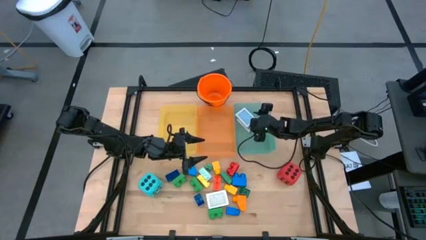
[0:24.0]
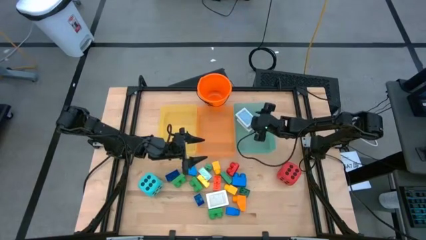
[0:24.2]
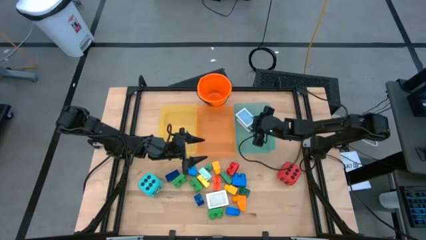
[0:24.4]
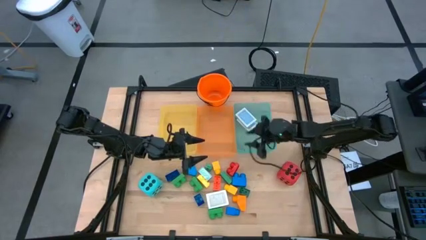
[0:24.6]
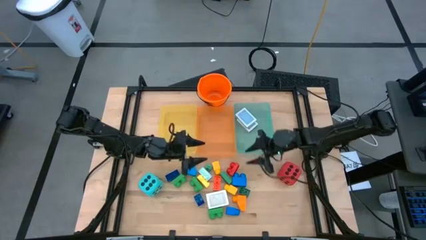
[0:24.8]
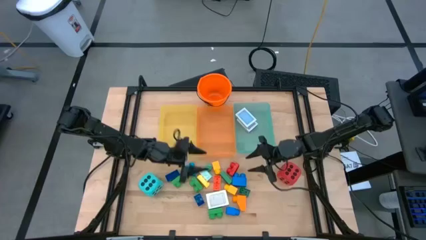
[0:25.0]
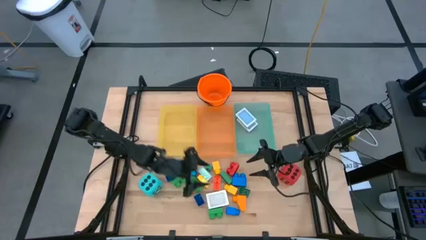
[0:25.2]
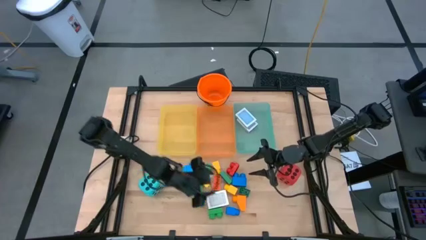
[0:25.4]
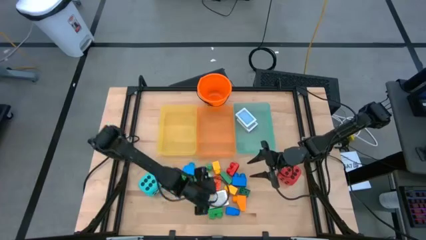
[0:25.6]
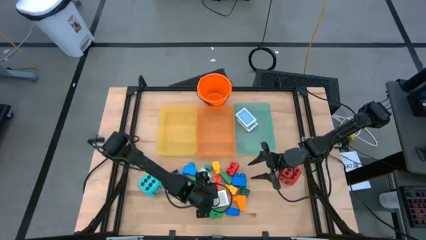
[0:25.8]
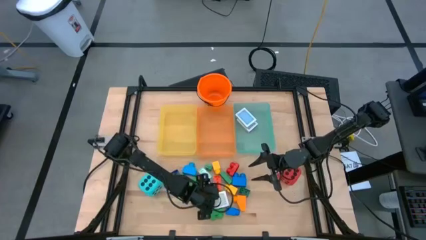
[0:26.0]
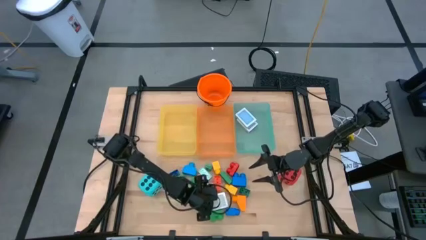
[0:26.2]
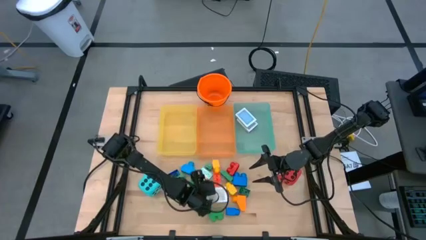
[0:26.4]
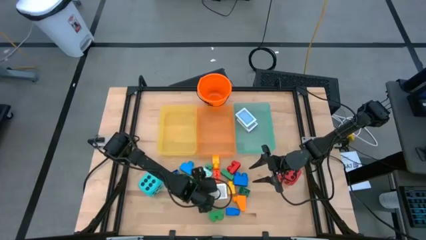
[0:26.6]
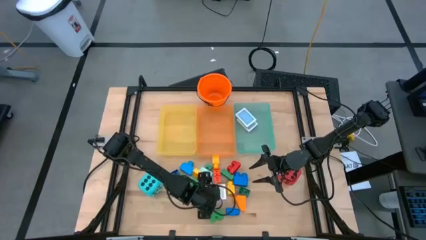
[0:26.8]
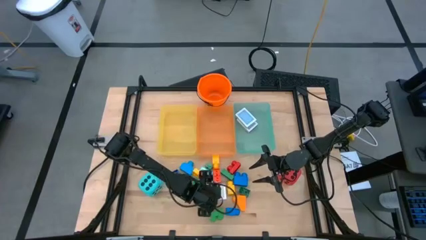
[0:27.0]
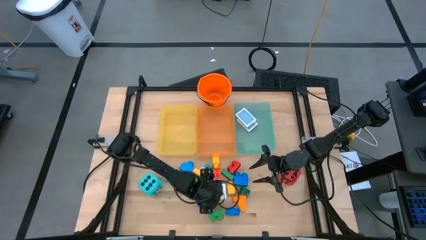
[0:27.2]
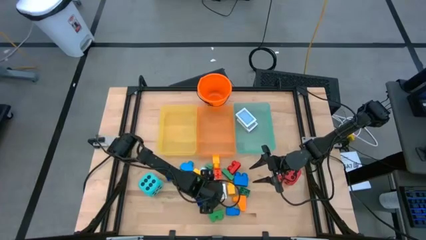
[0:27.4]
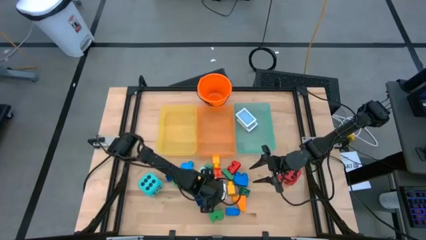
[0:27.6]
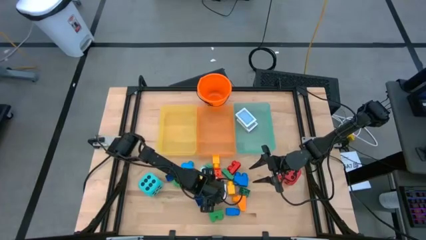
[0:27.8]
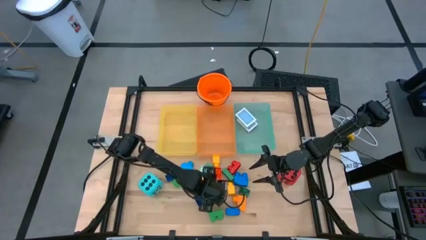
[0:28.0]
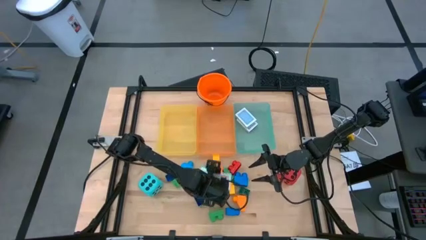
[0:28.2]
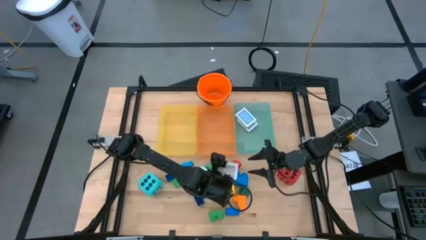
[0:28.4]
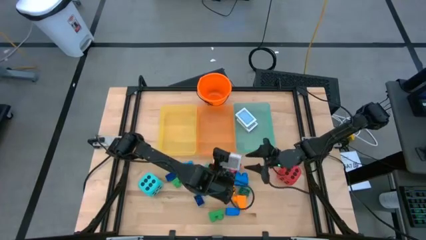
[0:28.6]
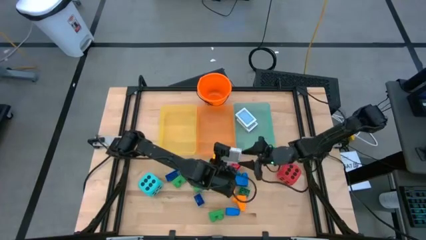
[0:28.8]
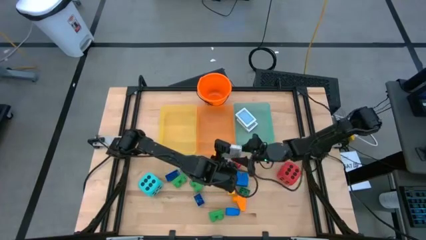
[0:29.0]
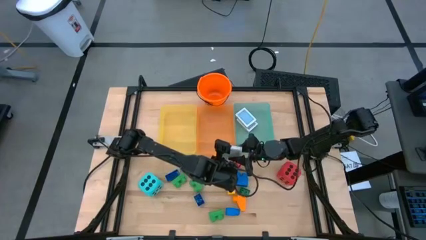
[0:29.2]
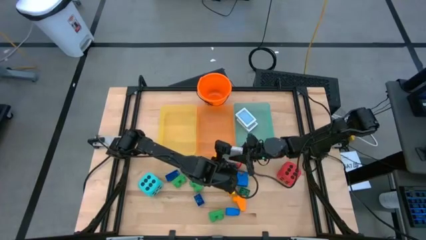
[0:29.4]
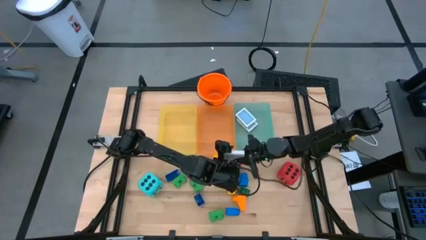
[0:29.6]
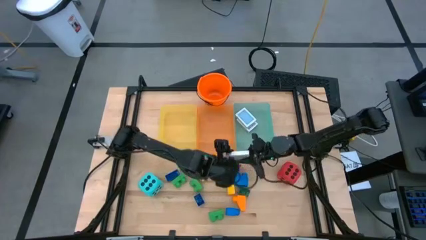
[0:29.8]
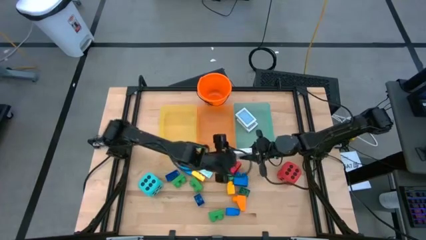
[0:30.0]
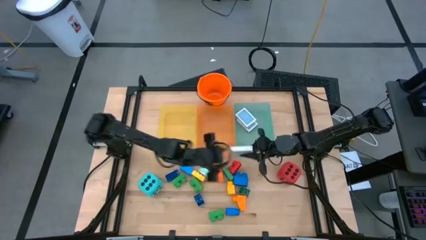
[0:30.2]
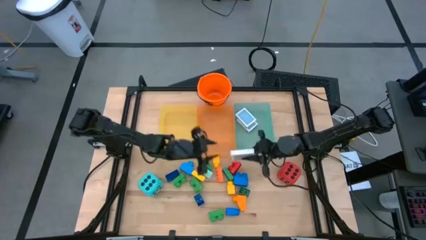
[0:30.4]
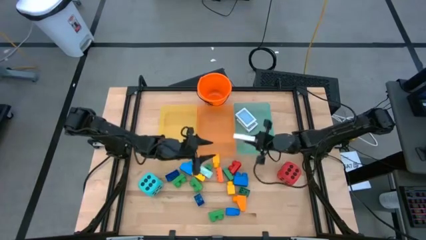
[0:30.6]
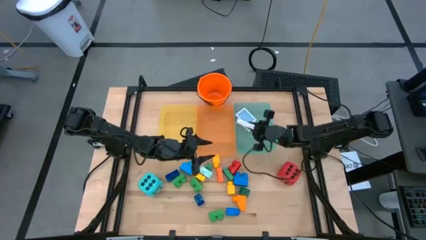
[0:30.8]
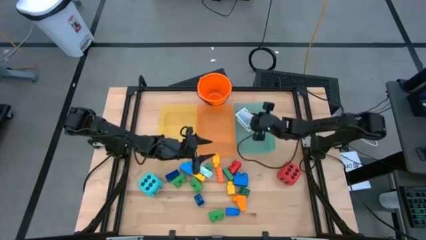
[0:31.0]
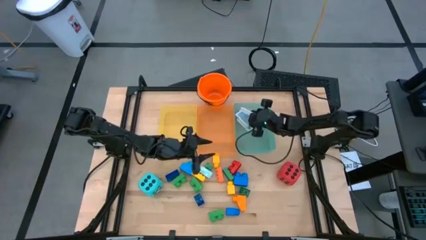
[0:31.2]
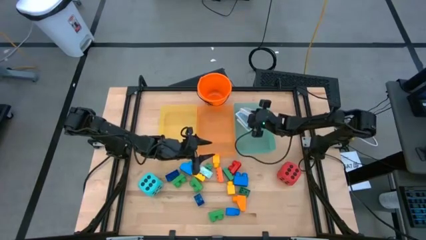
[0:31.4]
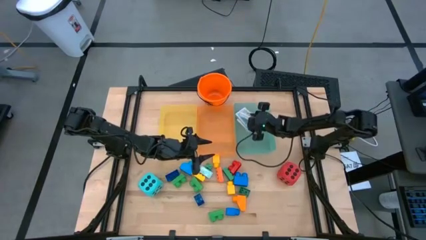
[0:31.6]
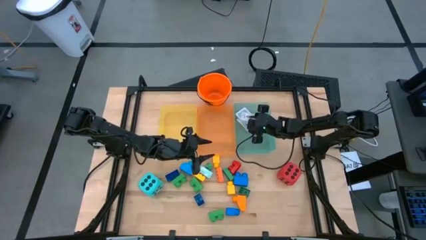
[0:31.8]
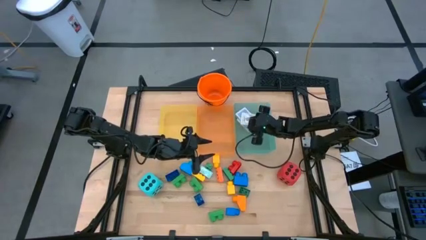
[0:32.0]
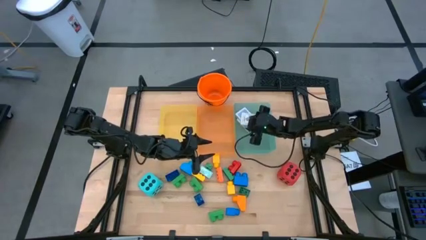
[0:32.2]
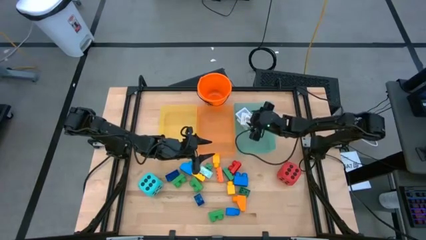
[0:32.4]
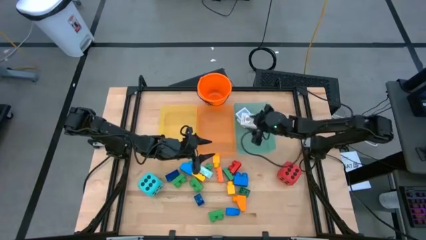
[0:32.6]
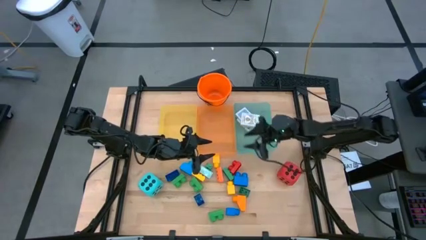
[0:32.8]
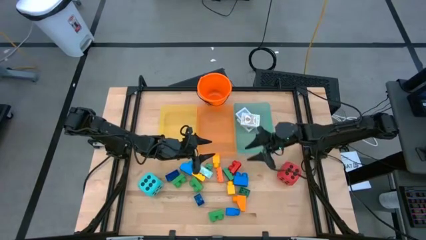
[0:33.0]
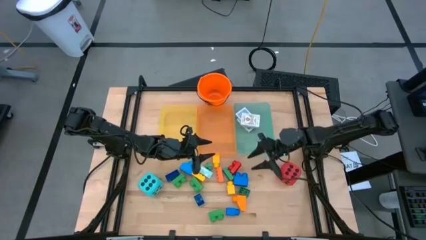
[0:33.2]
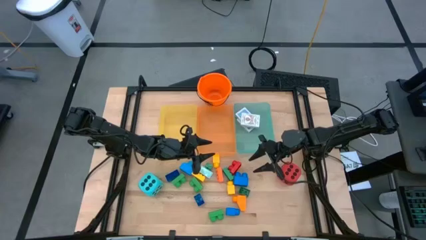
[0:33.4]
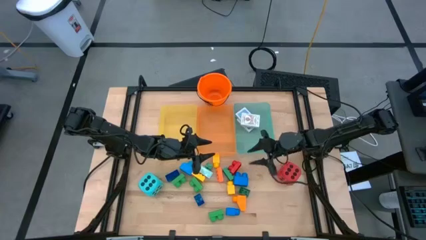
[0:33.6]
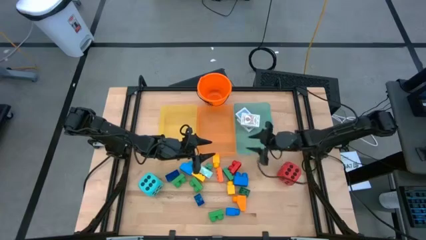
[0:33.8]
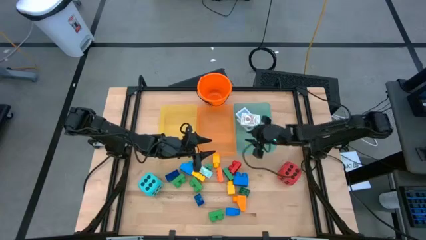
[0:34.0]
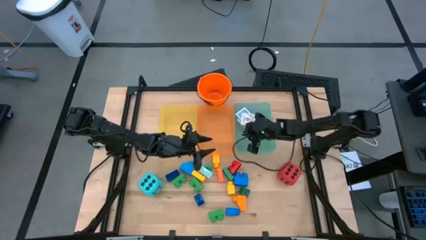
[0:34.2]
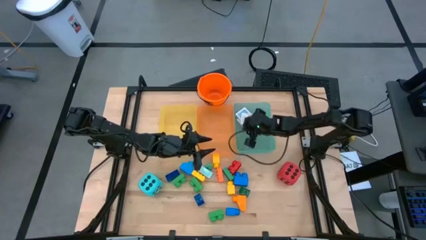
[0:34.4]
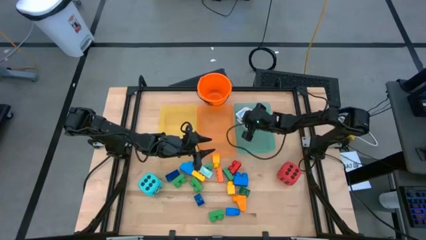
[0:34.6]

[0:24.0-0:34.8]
Task: Pick & Place Toys
Put the brown deck of cards into the blue bin

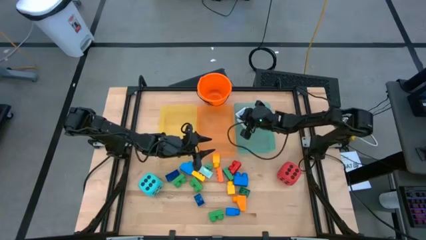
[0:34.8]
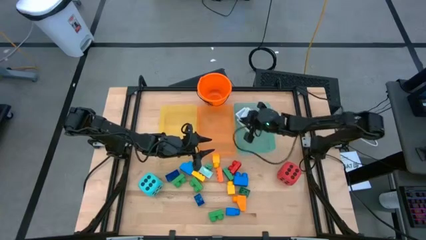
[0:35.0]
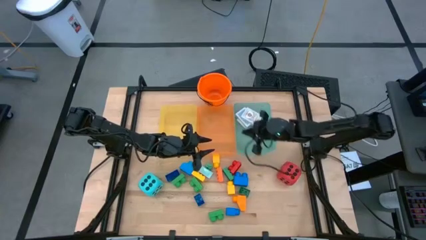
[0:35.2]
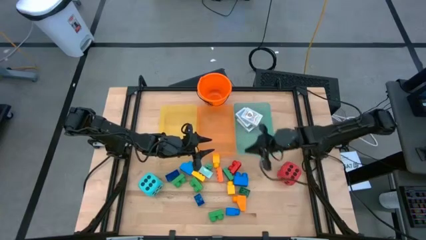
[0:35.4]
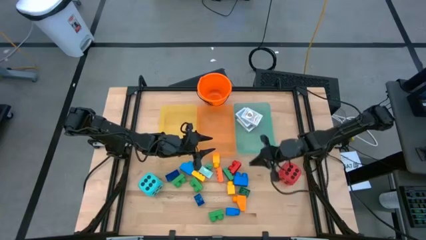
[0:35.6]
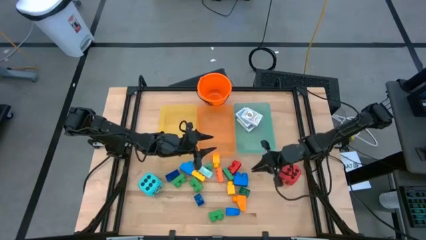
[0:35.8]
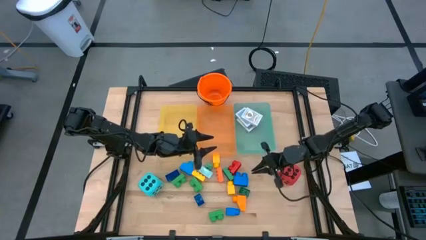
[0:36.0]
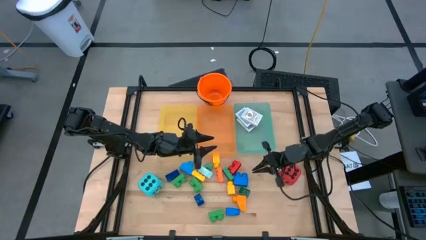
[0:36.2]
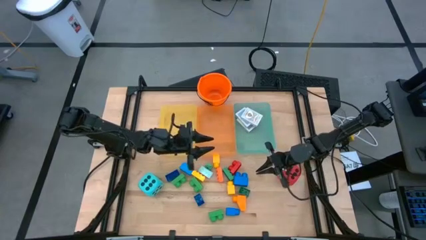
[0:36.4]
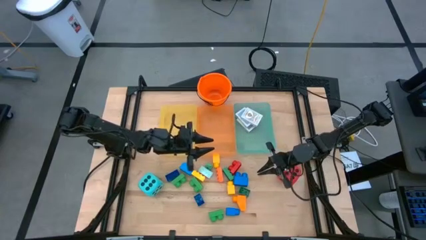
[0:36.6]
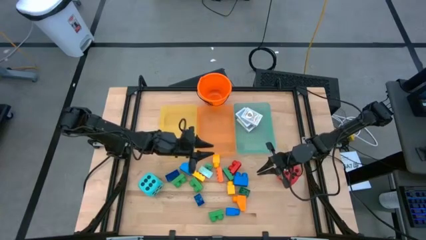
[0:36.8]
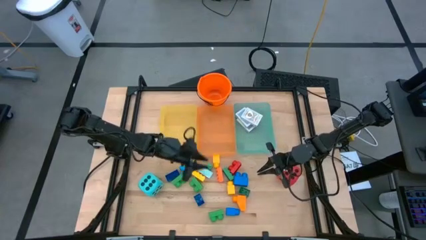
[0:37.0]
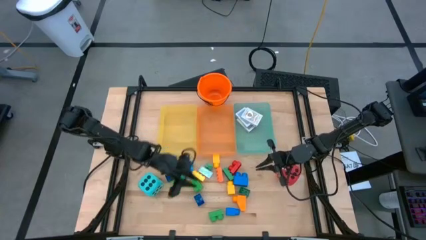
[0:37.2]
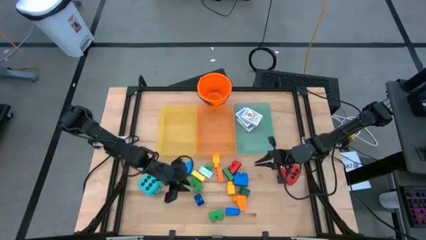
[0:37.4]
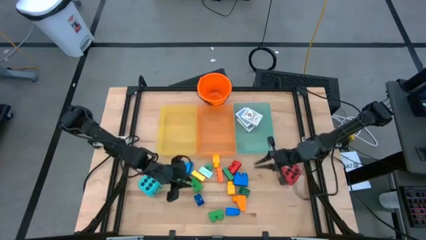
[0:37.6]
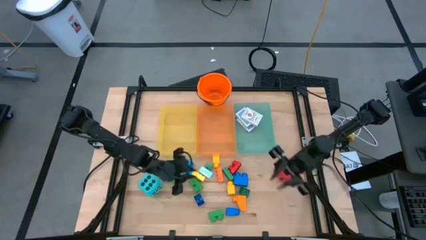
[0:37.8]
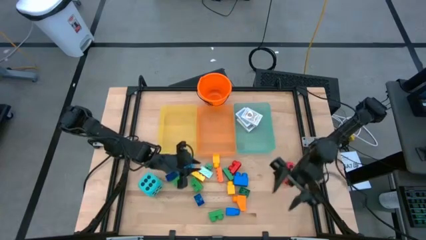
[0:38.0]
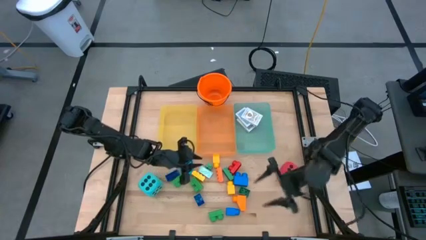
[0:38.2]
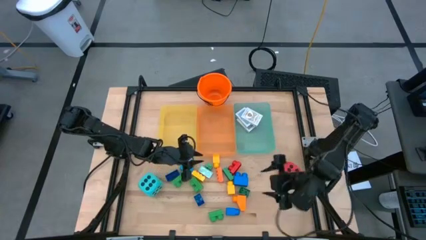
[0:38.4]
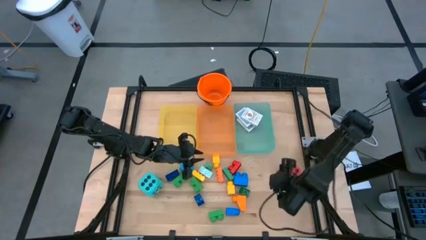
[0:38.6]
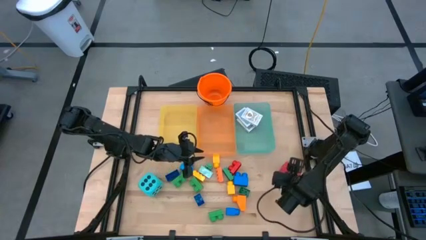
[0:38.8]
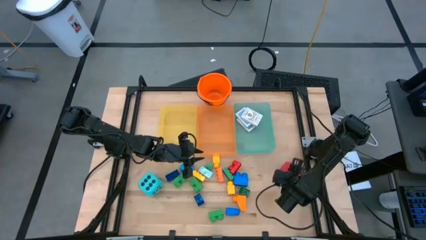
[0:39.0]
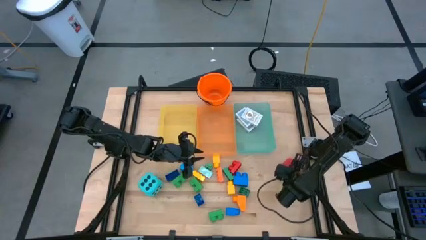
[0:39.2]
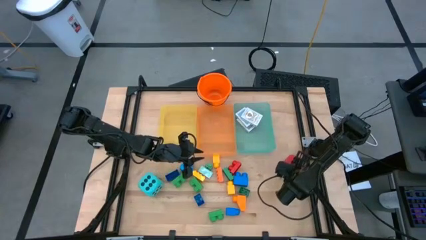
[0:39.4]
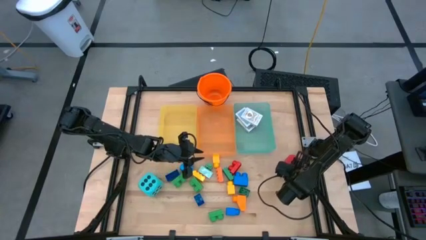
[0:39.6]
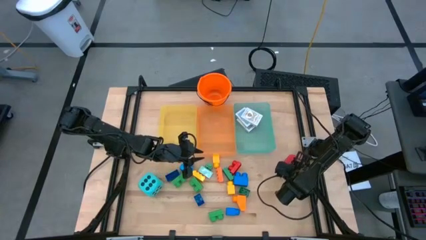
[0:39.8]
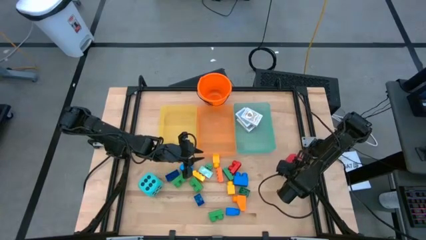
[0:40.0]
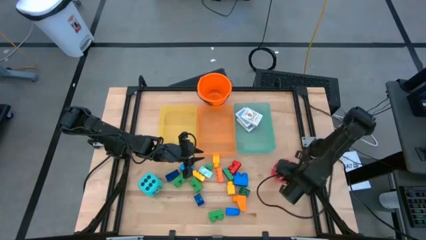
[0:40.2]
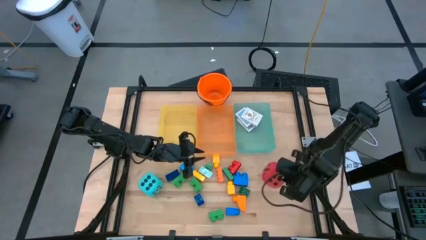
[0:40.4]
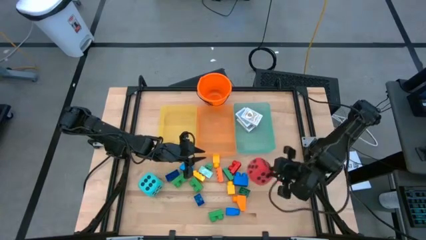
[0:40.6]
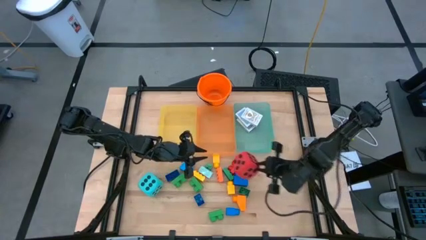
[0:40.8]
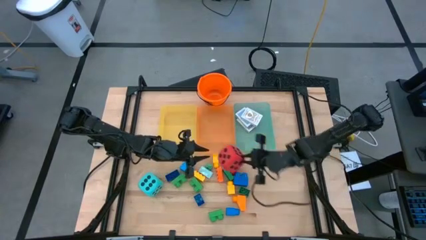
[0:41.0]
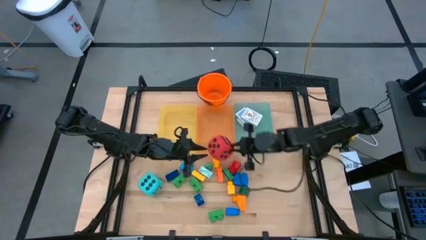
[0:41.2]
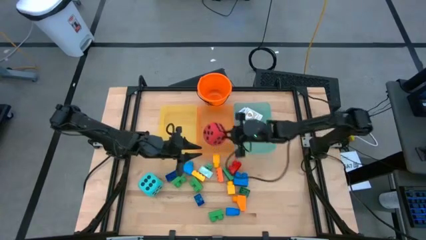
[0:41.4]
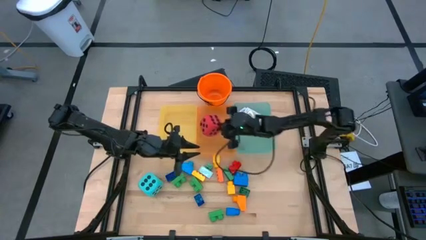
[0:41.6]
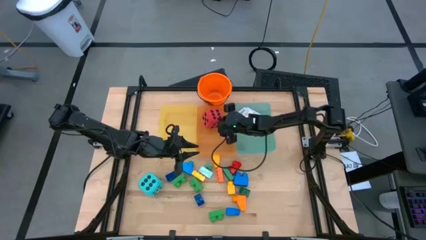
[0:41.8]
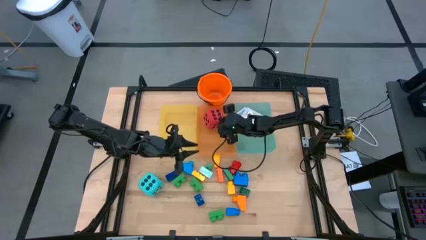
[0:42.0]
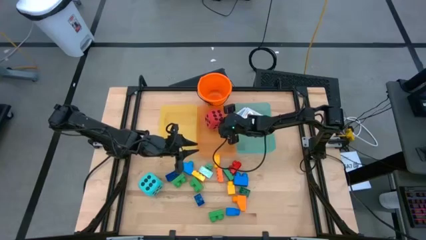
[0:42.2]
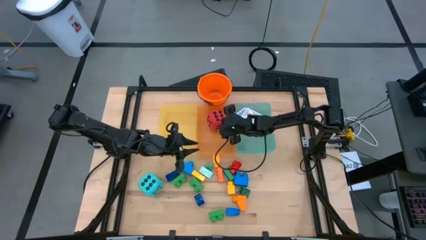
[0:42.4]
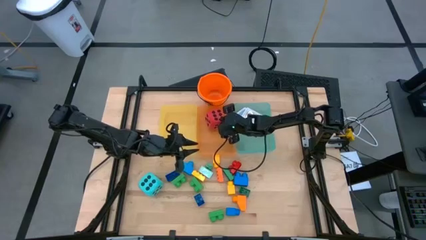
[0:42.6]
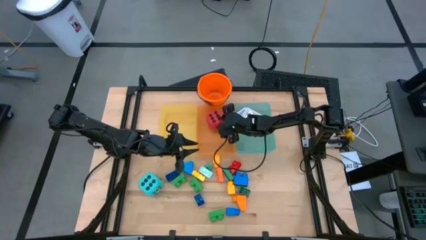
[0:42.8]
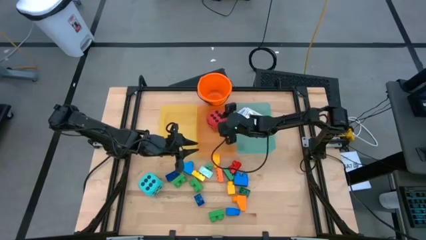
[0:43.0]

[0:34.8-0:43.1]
Put the large red dice into the orange bin
